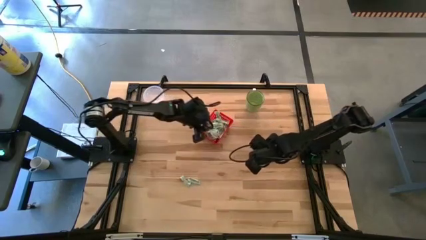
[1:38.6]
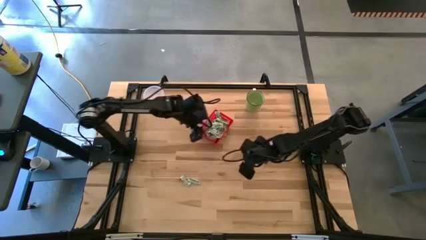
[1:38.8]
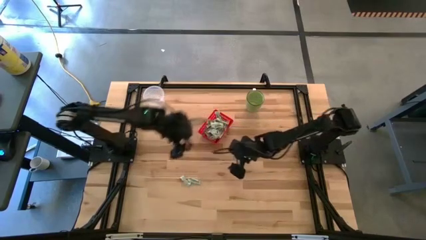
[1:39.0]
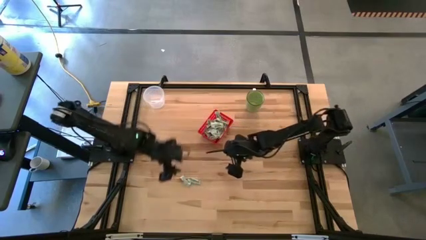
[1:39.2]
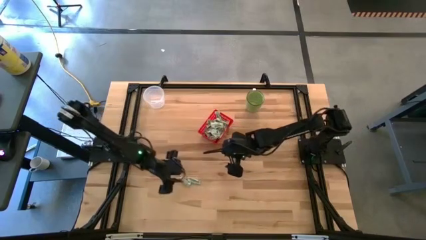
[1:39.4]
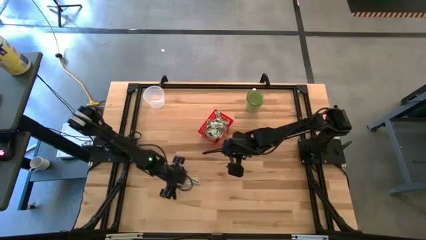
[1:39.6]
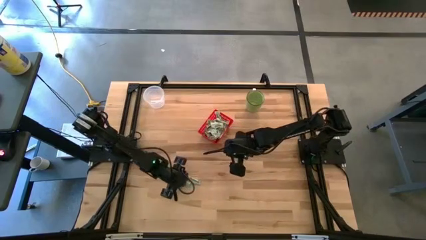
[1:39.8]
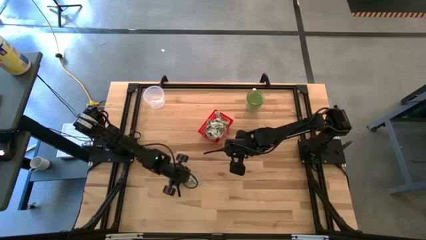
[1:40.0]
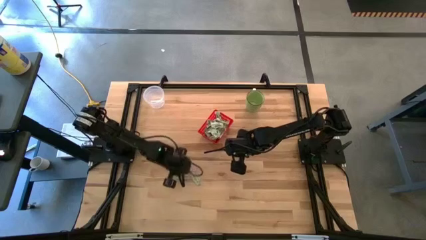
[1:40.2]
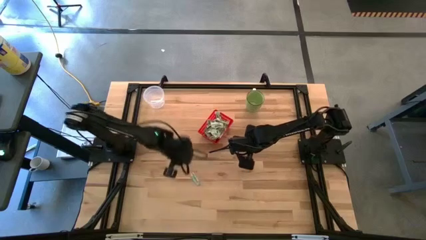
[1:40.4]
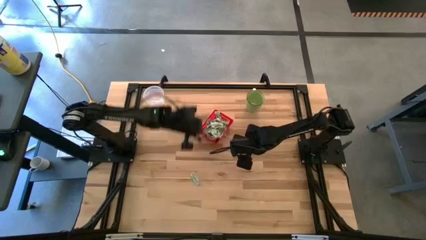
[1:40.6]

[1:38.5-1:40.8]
Task: Pick and place Stevia / Truvia into bins
Put the stevia packet into the red basket

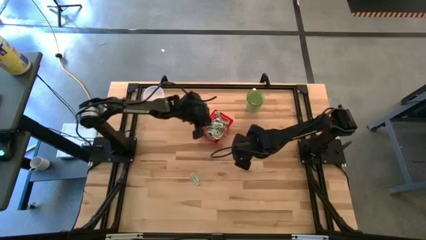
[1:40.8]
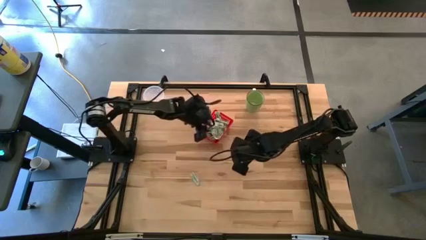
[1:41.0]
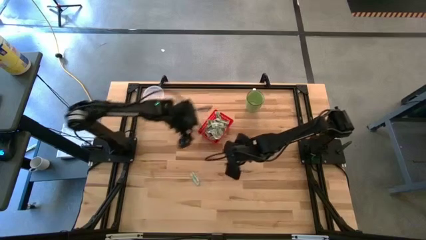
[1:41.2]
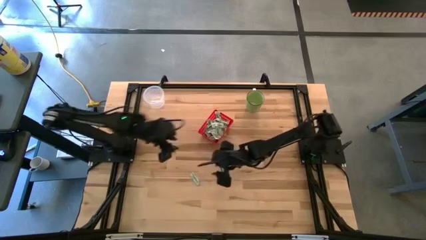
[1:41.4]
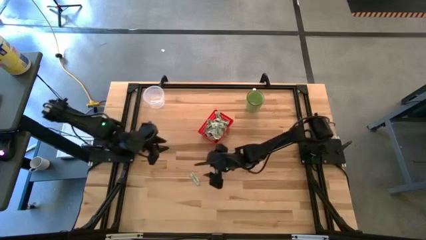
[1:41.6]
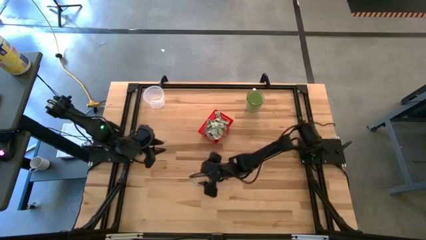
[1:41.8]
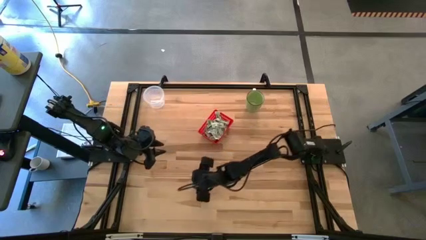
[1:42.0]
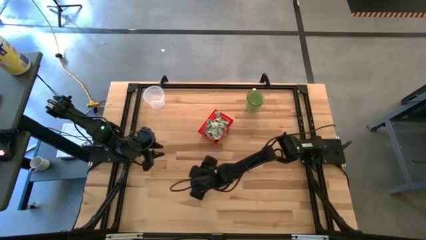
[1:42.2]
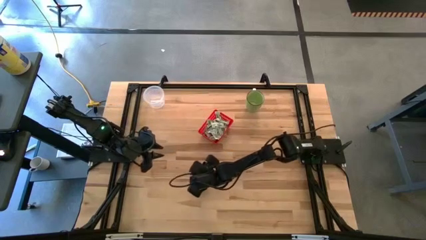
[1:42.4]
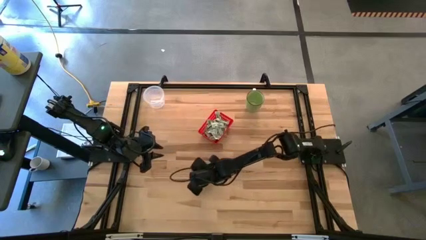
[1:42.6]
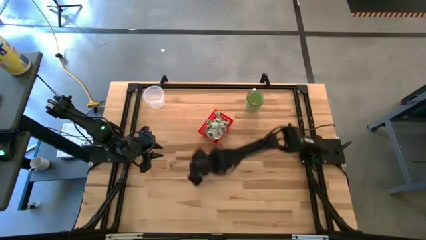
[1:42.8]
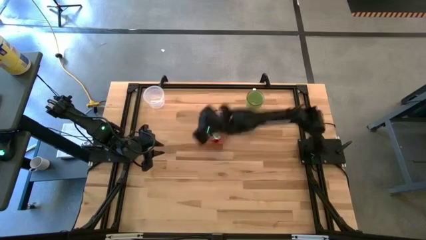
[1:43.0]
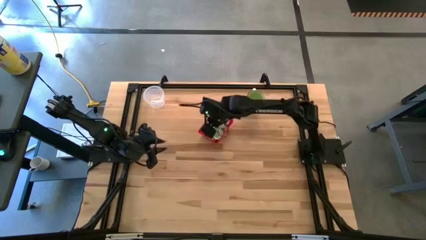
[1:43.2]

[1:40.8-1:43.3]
Put the stevia packet into the red basket

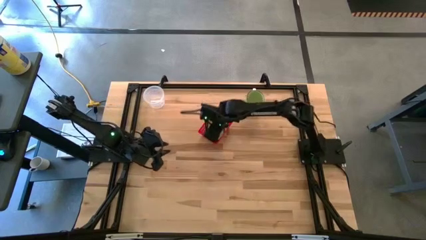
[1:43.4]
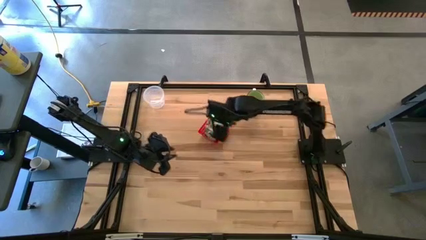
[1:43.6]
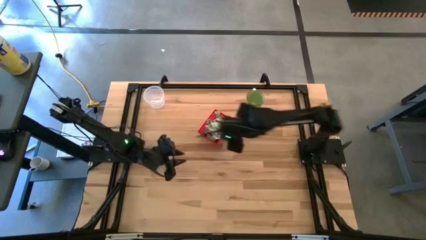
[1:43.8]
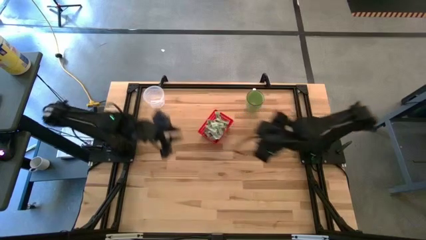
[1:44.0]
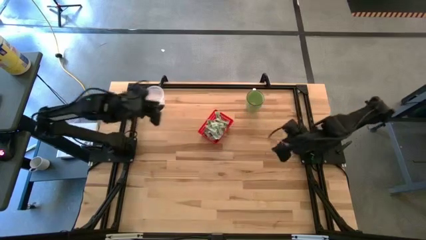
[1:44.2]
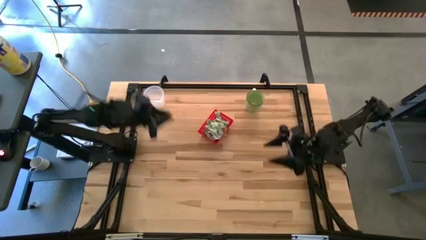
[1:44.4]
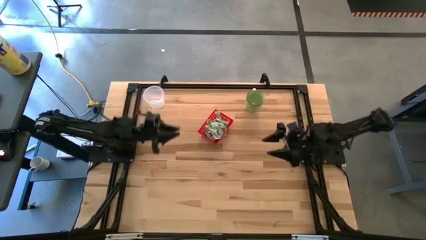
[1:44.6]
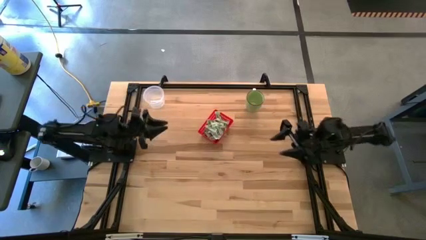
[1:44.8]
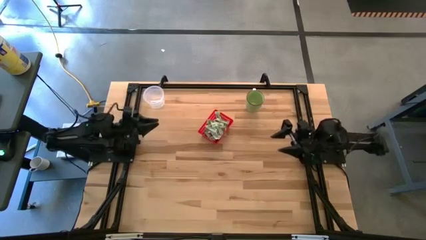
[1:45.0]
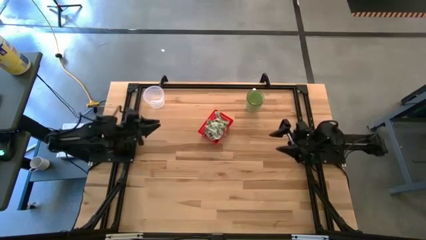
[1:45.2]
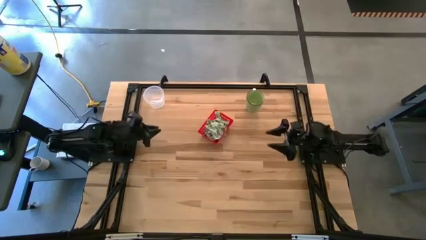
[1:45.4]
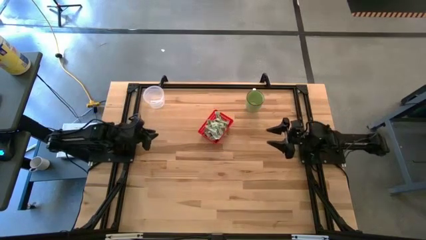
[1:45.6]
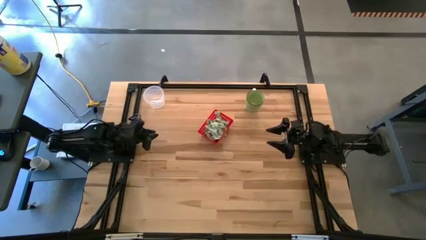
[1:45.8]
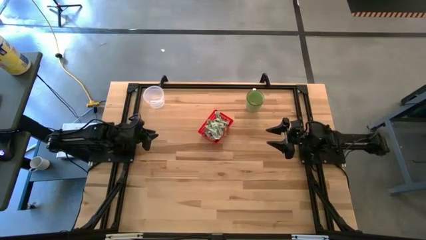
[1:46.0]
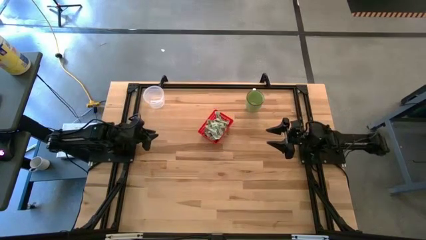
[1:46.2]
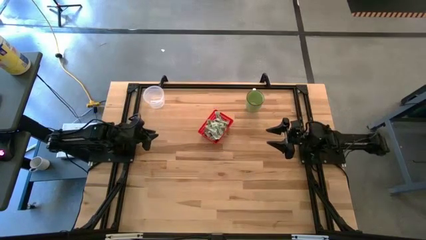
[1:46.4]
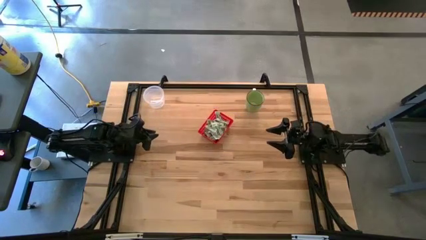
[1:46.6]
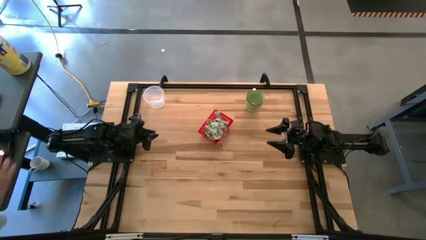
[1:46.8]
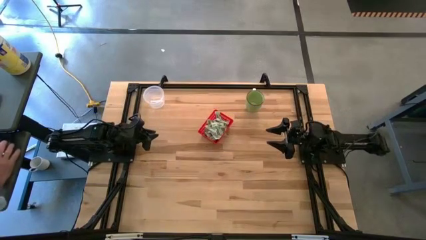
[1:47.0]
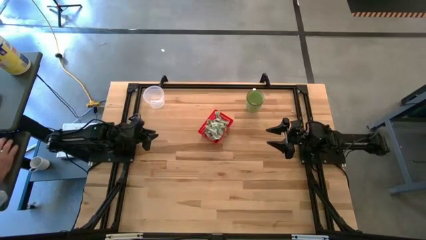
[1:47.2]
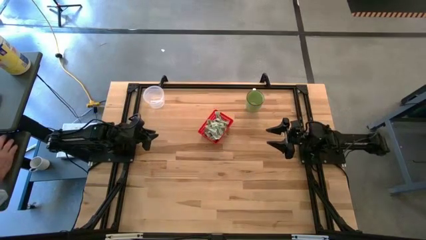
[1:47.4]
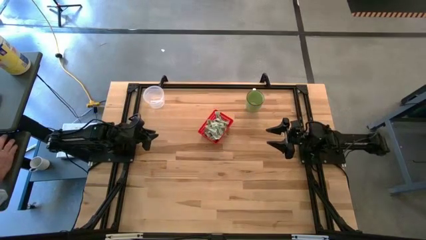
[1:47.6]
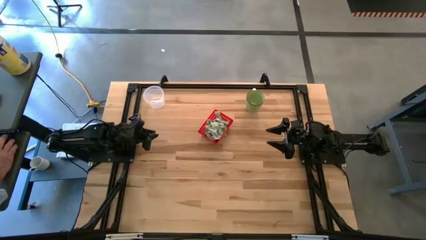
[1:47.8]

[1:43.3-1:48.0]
Return to Home Position

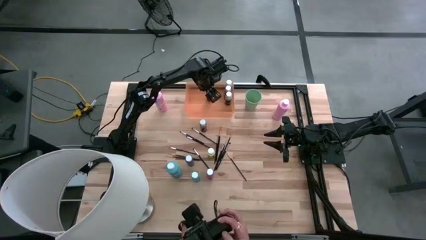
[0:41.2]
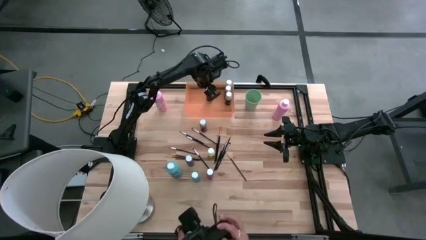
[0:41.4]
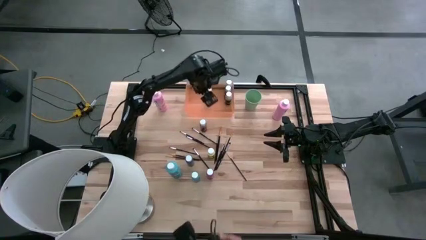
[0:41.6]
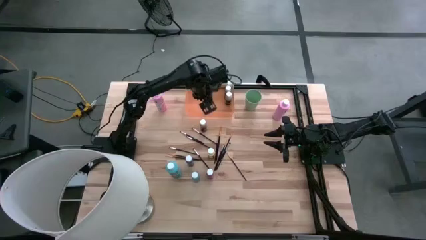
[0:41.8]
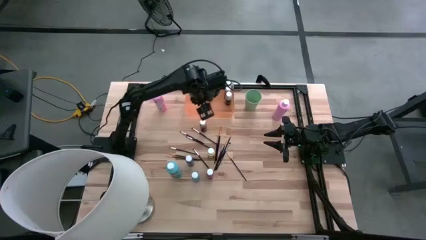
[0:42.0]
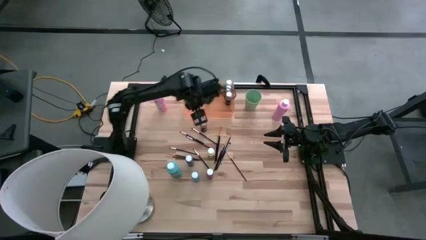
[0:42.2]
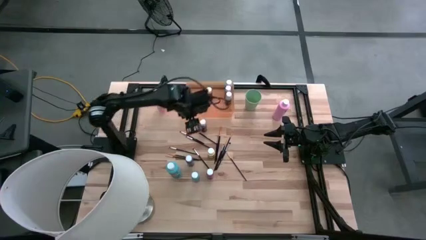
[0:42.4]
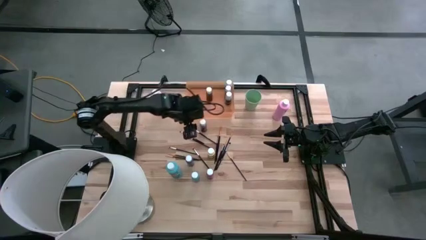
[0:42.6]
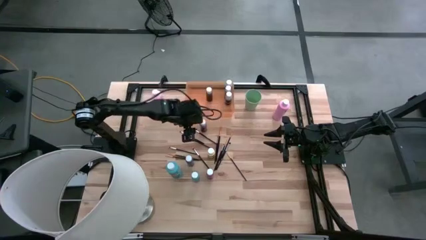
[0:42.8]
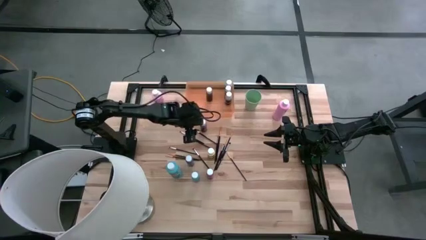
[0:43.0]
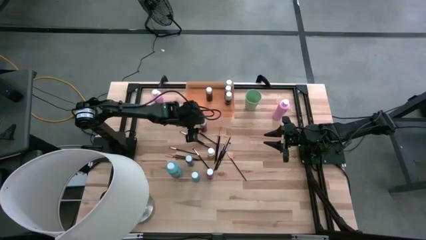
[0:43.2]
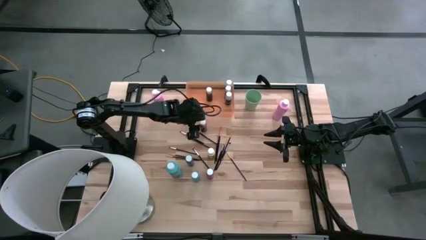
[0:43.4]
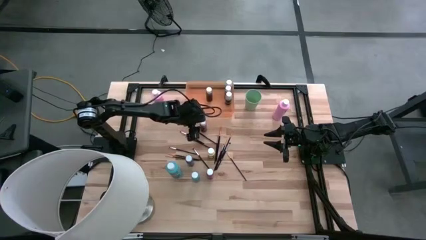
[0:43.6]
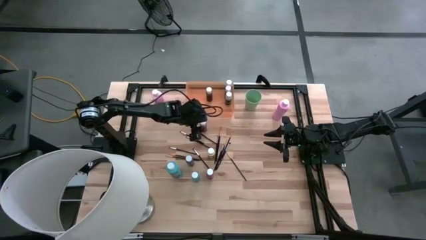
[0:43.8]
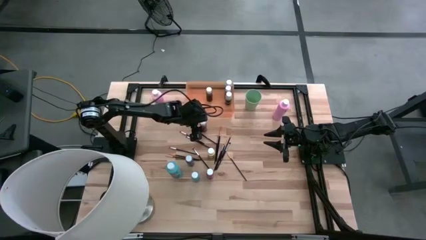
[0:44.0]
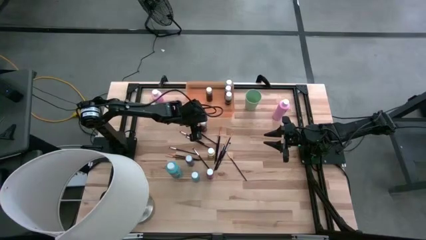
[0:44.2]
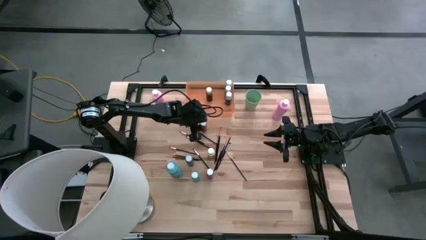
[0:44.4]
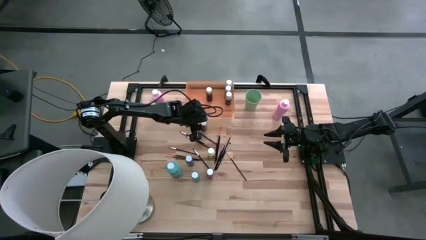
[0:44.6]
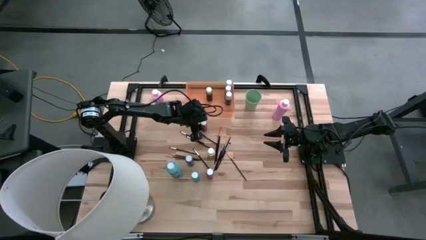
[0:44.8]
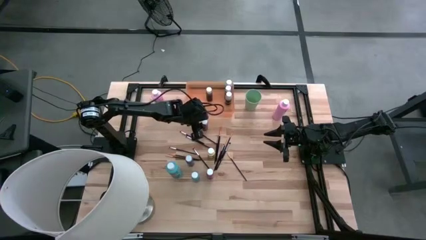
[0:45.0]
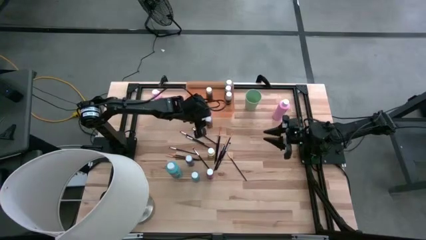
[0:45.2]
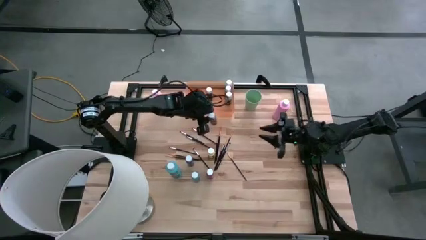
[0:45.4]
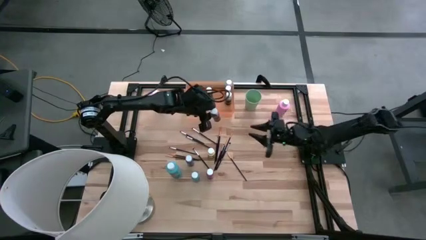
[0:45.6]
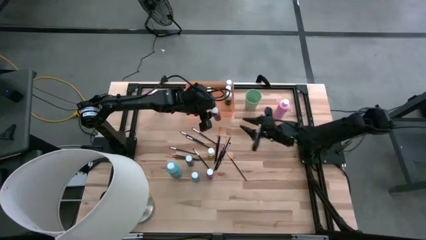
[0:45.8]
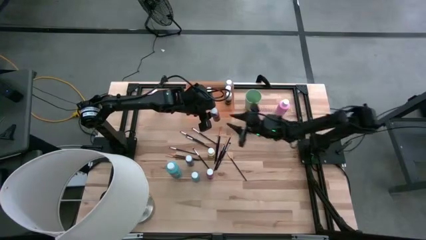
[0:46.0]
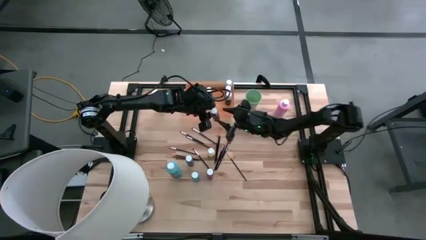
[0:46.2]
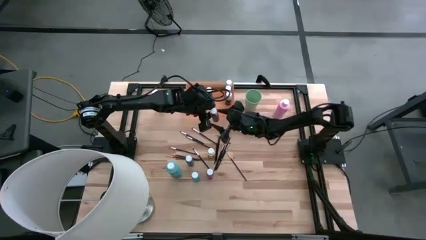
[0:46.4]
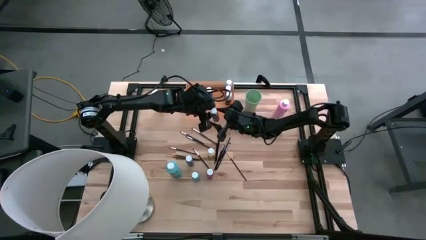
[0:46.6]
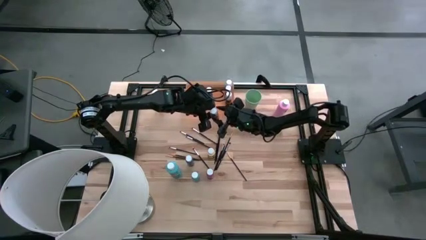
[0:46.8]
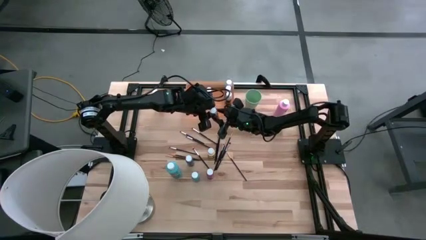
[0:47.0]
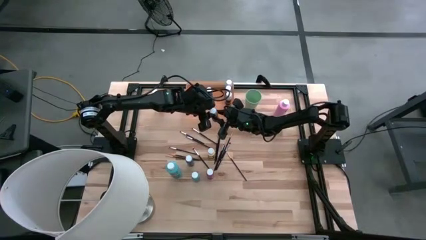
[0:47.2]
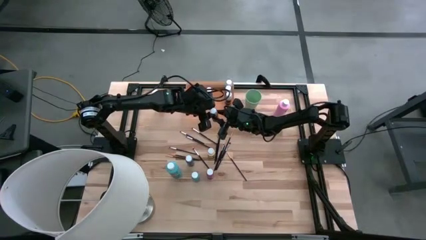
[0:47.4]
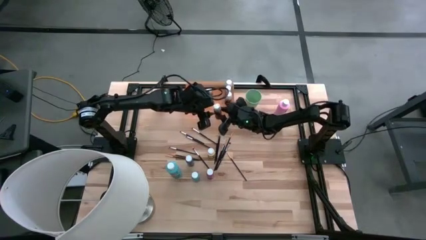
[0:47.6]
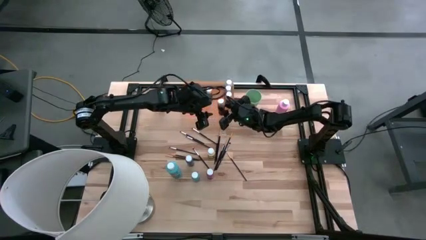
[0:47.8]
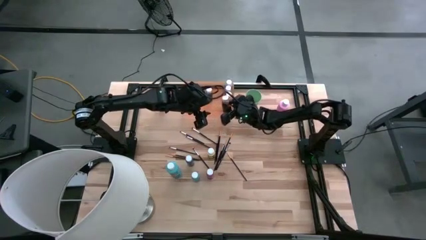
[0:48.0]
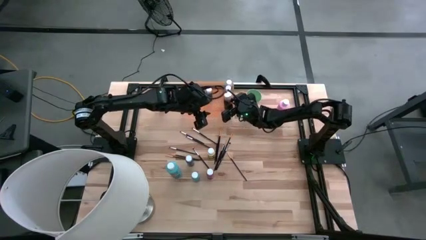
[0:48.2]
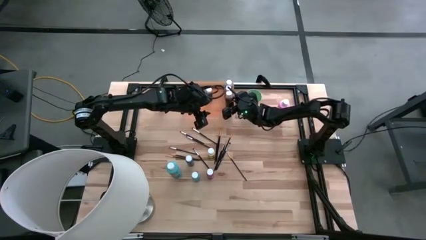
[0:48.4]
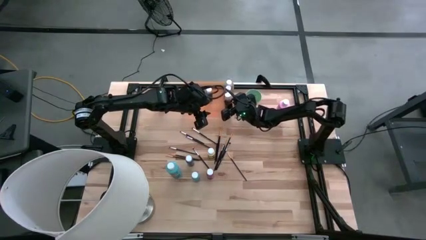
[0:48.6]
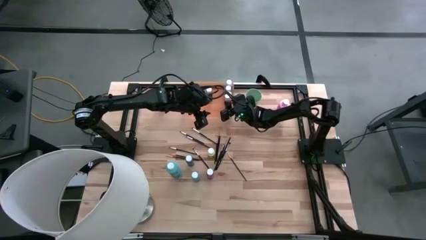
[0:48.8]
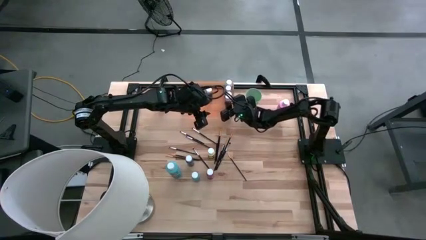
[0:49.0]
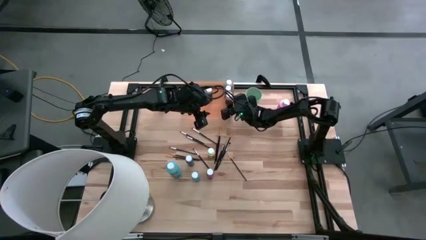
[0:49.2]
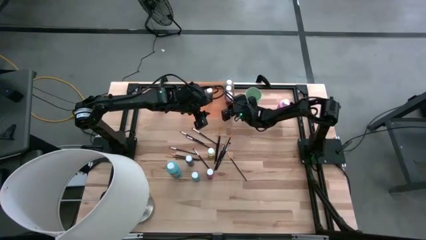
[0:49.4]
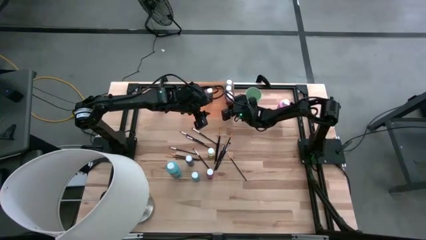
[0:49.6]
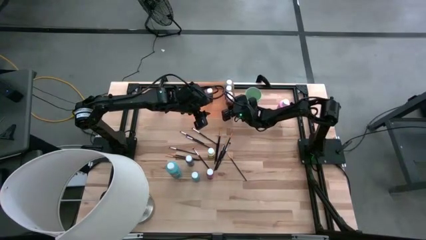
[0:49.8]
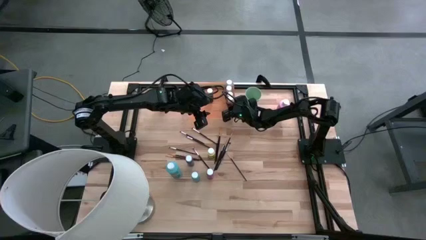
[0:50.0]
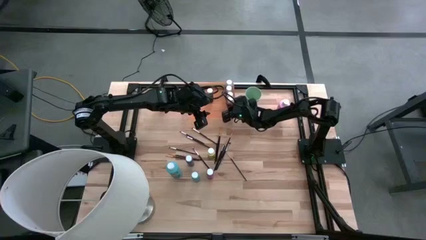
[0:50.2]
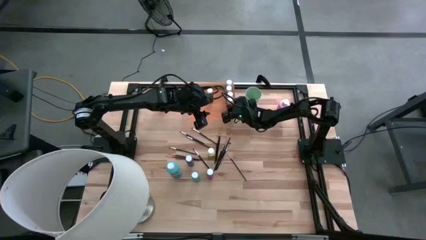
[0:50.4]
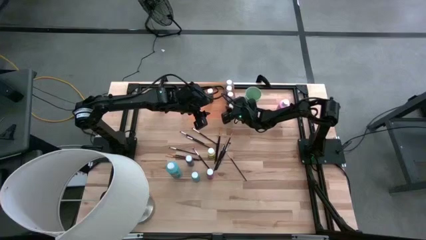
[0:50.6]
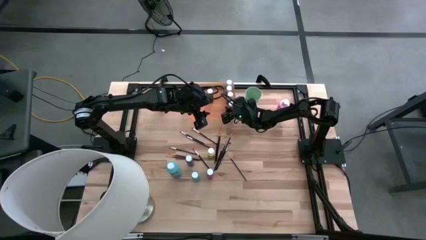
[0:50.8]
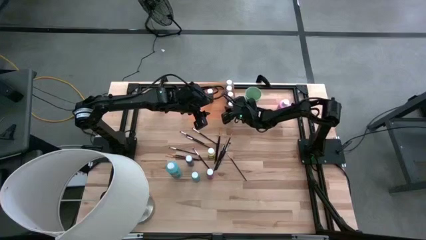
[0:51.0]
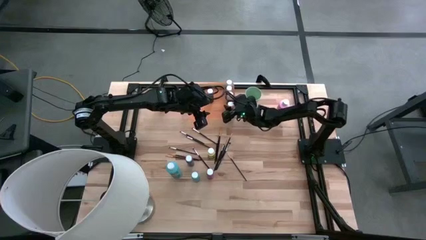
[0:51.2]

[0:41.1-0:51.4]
Task: Pick & Place Paint Supplies
Put the small orange paint bottle into the orange bin
